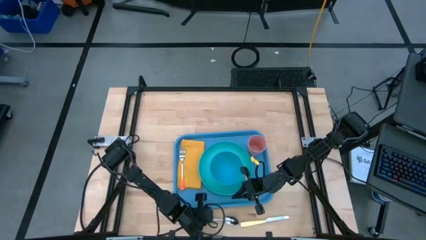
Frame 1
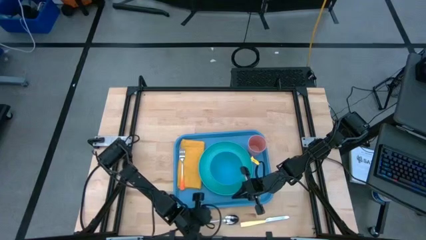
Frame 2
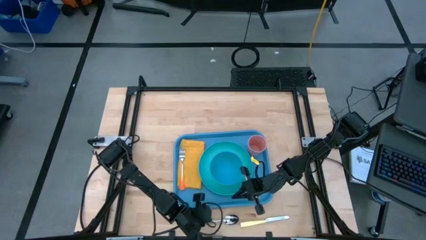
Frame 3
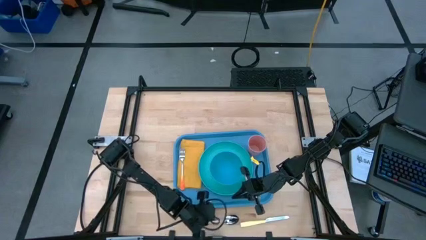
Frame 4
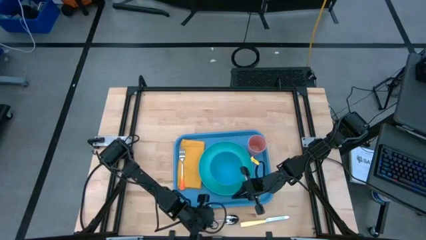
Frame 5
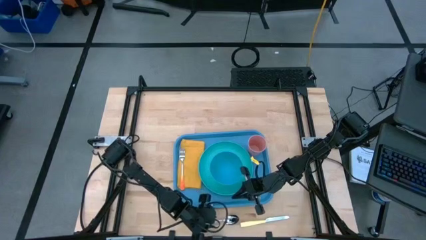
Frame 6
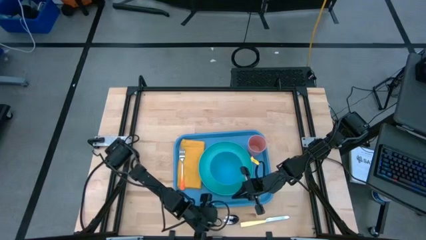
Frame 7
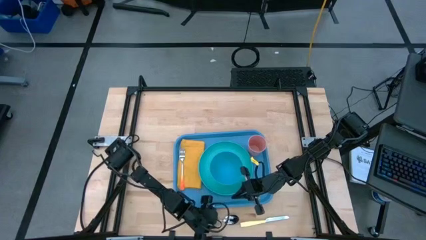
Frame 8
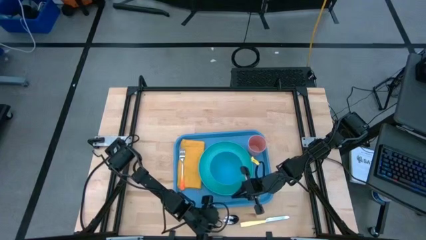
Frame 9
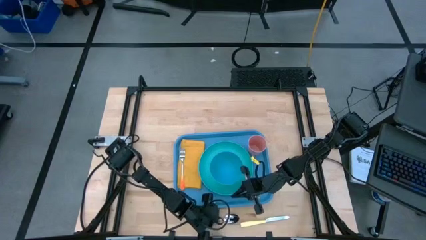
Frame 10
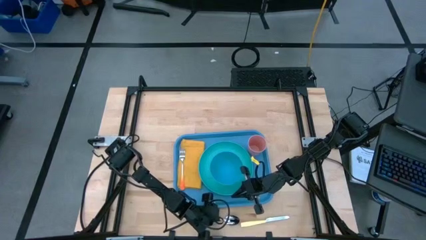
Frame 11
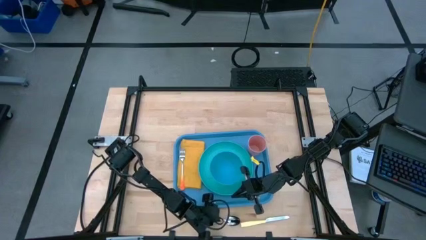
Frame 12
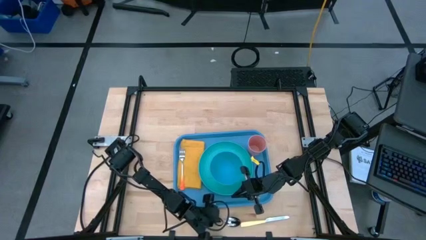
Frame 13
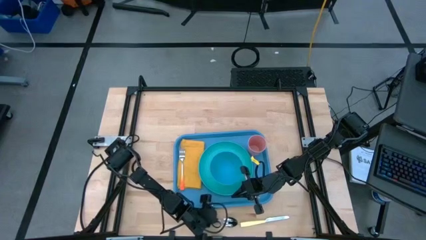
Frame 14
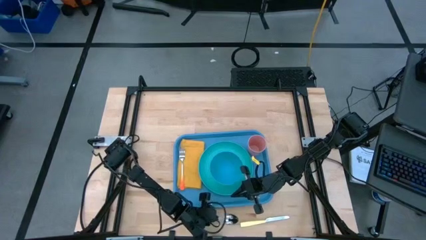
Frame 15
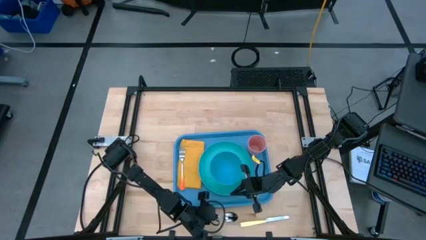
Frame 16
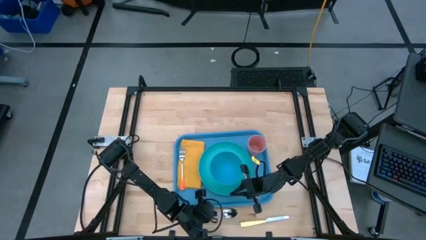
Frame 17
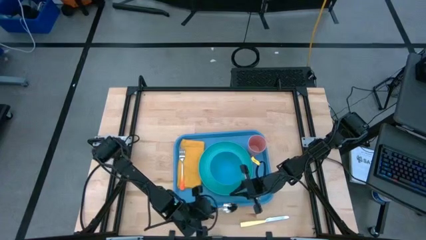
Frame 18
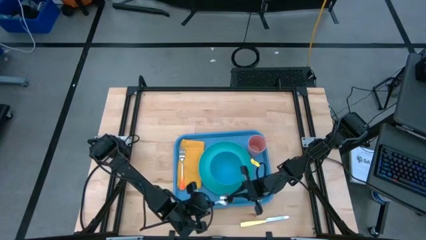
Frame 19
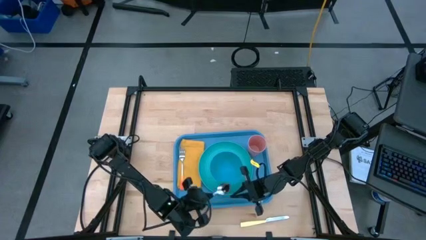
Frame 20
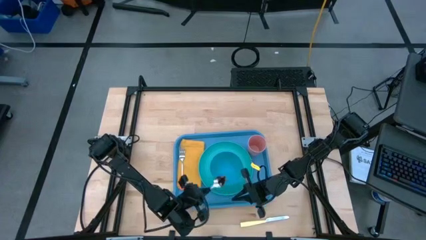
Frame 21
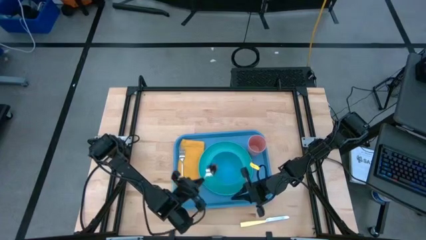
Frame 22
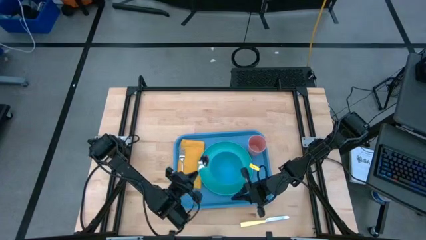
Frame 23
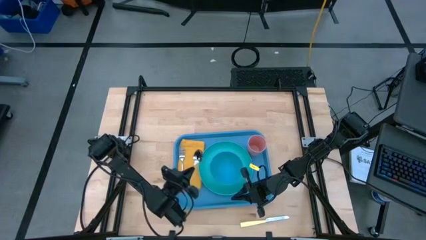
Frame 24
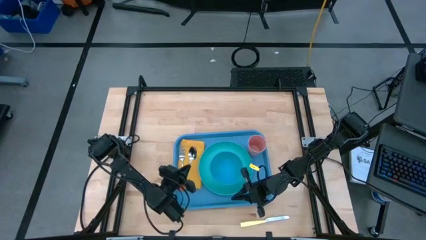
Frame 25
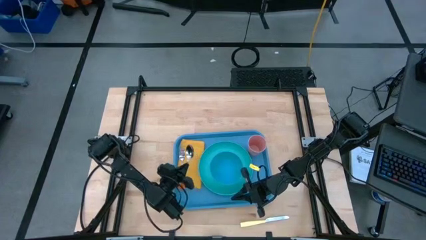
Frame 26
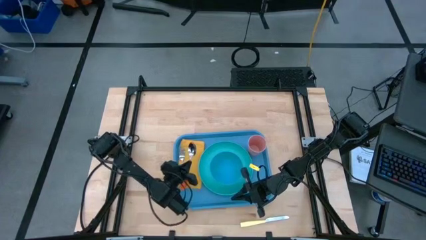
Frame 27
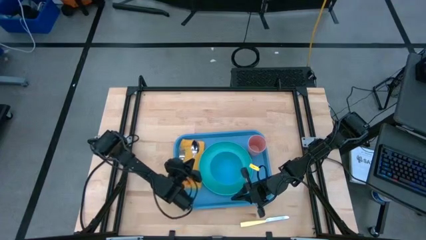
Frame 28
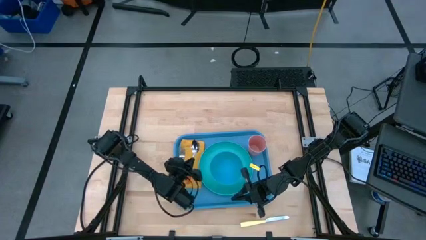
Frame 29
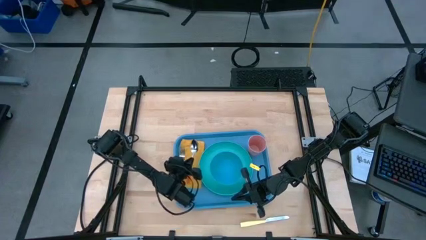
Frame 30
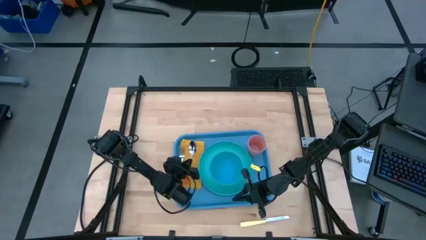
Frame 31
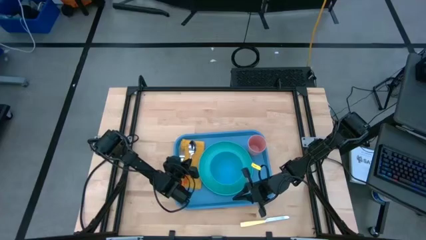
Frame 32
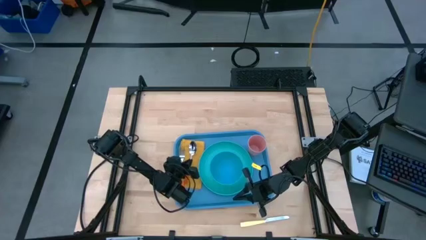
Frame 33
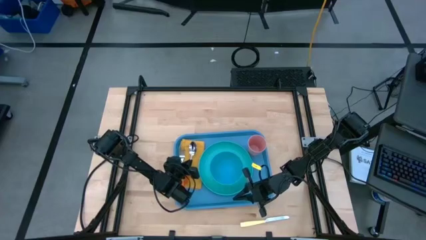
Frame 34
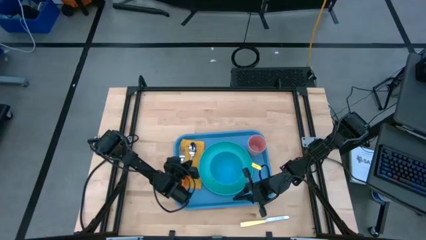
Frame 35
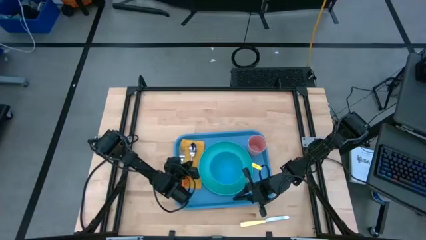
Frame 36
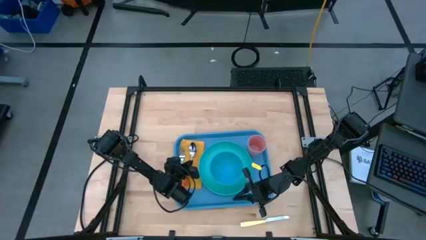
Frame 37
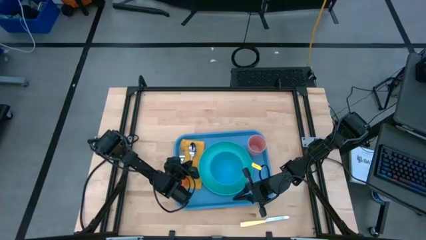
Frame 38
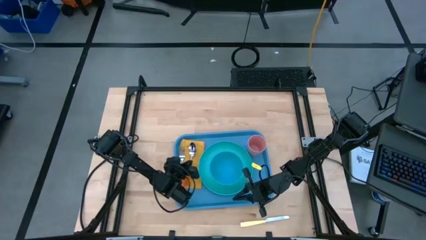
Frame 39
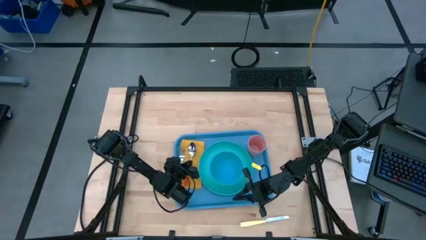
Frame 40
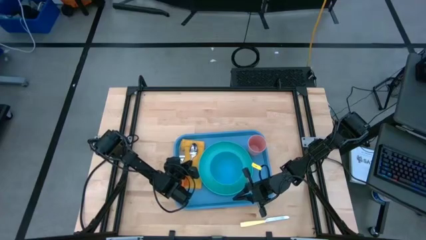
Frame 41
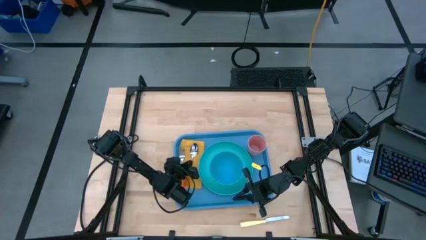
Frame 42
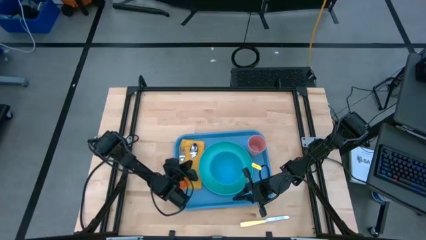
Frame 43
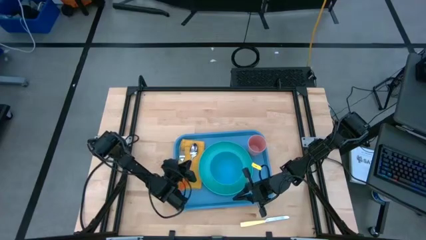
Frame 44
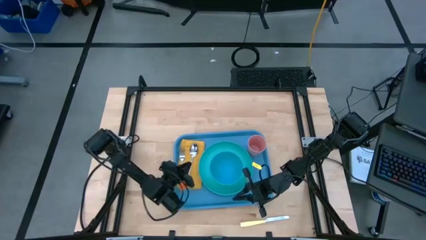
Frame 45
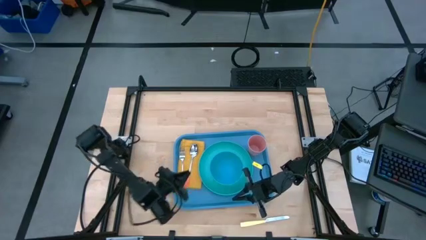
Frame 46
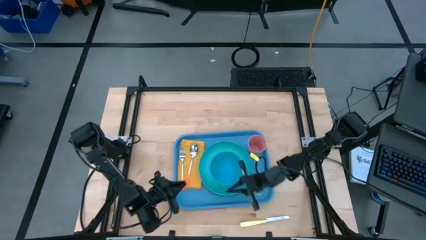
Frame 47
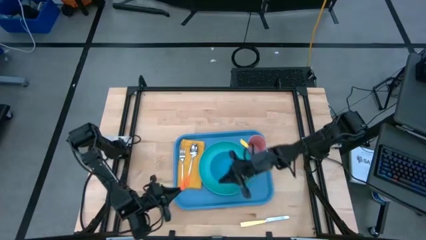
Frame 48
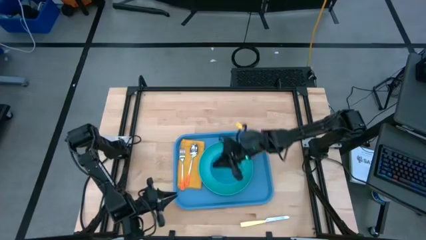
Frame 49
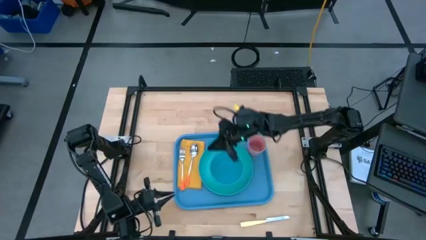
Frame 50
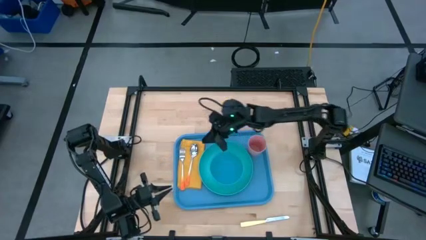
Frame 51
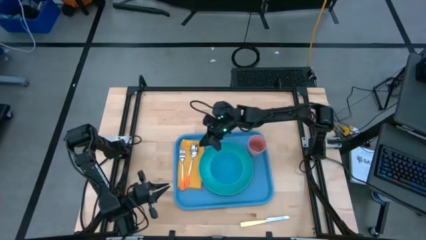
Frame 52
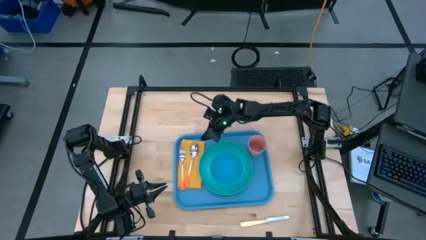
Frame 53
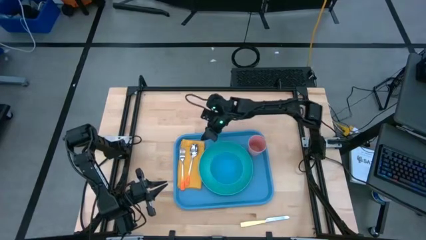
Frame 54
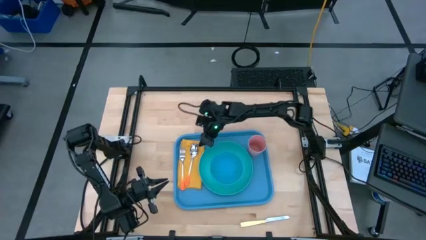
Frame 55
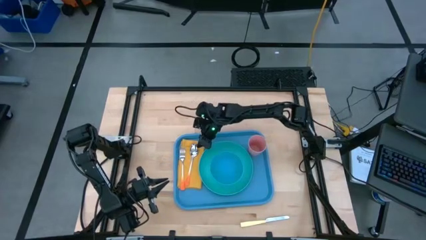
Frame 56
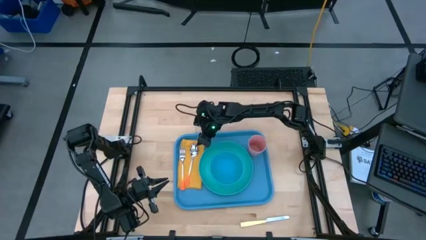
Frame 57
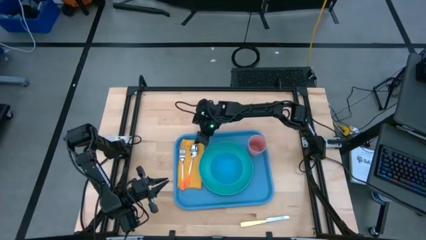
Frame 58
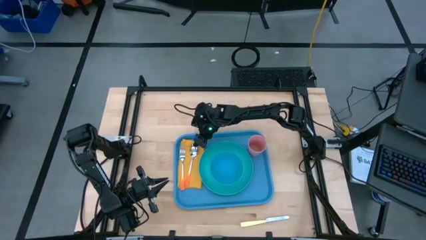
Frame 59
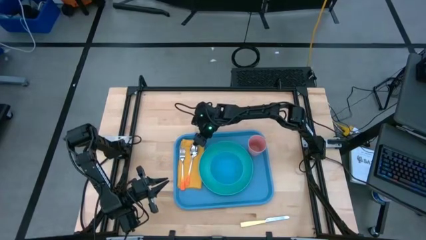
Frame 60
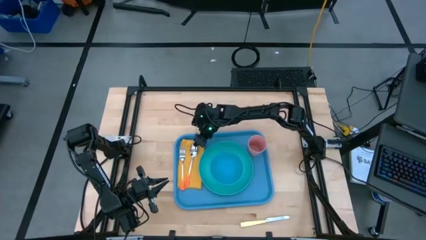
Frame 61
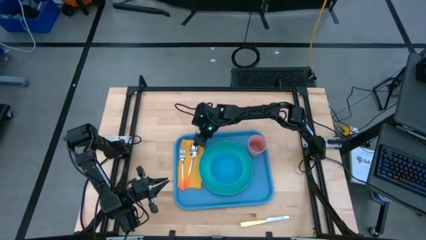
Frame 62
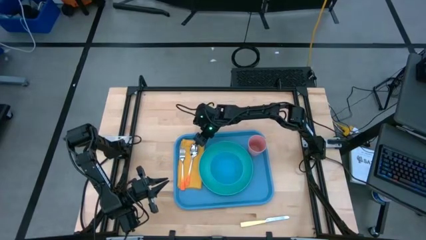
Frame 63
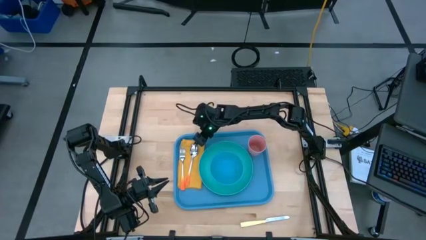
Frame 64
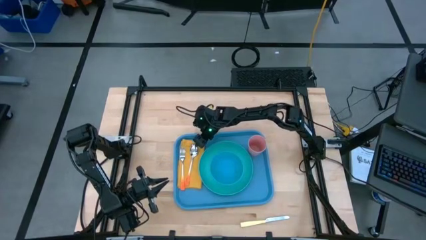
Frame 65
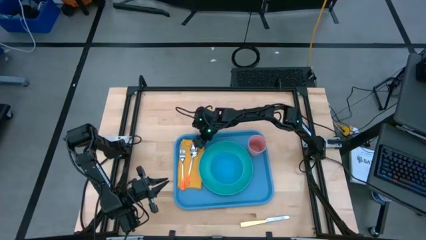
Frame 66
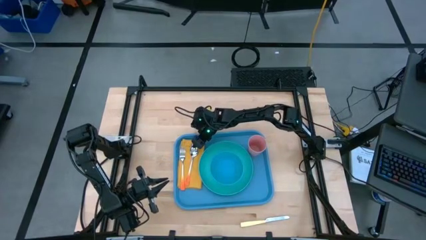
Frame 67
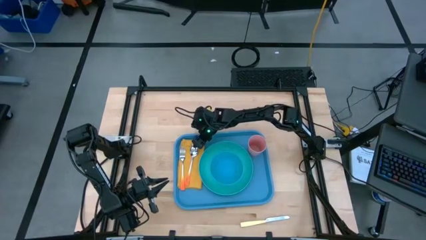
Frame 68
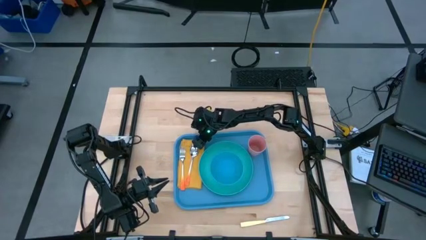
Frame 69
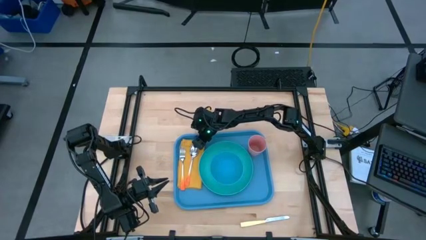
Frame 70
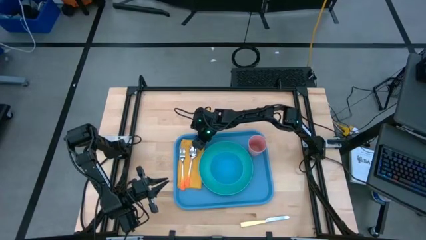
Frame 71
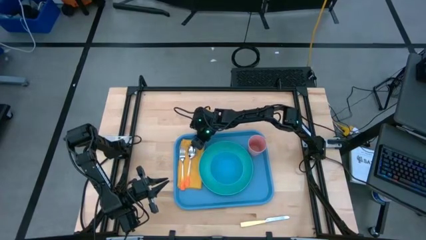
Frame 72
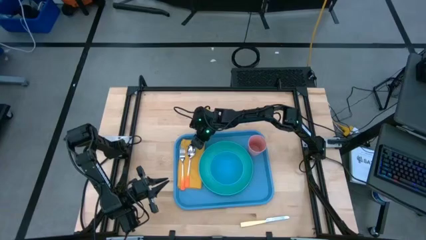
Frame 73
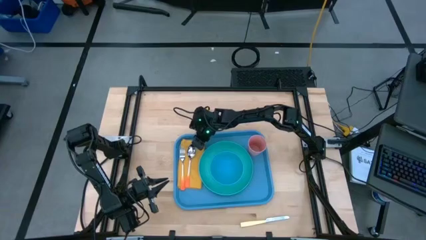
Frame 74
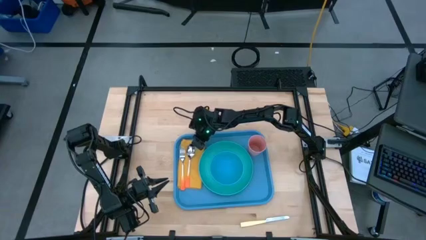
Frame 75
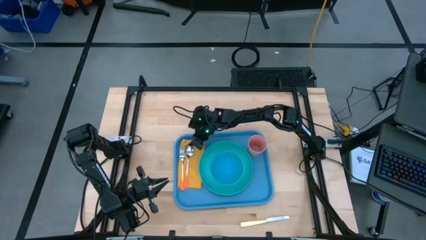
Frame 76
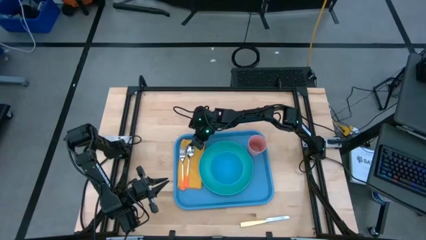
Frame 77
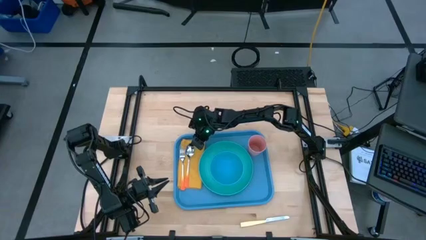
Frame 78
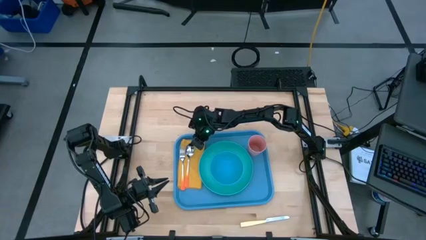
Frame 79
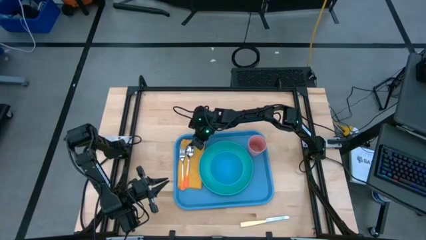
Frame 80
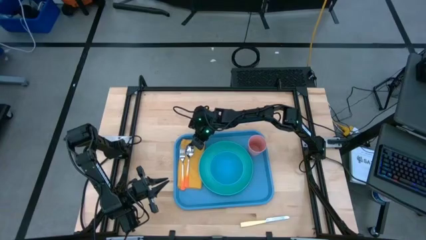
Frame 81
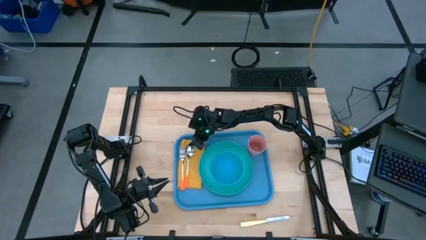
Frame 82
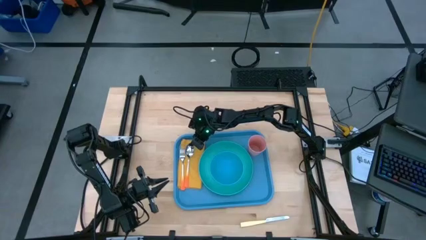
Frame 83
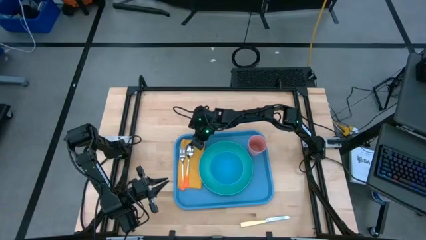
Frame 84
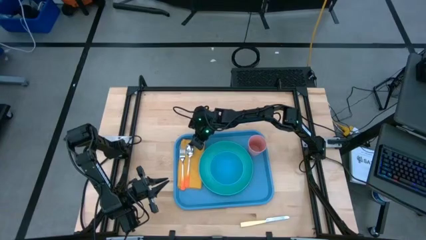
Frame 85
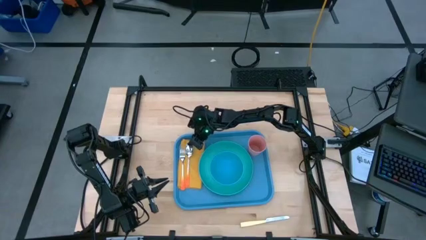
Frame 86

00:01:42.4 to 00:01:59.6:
Task: Set up tray
Put the orange spoon to the right of the orange fork on the yellow napkin
